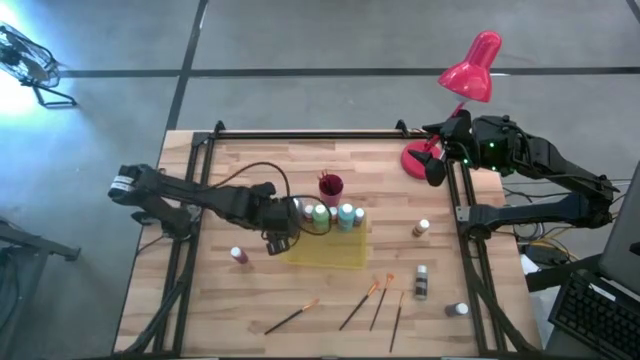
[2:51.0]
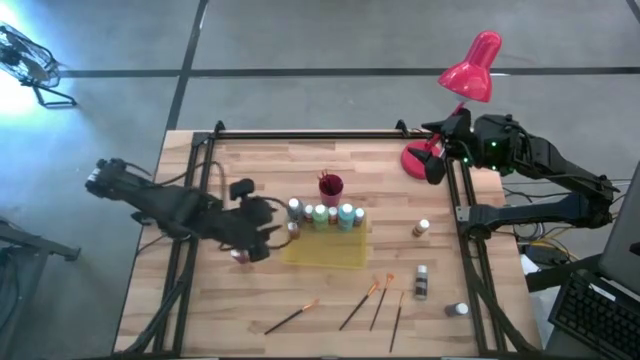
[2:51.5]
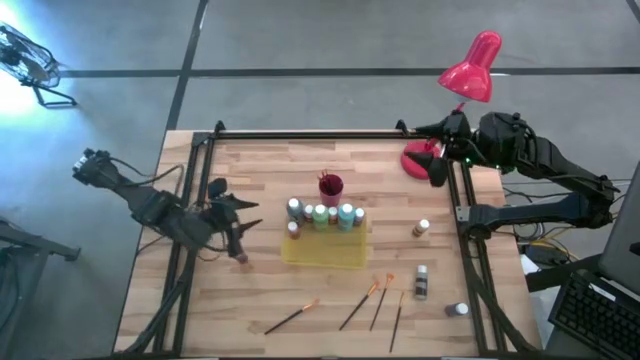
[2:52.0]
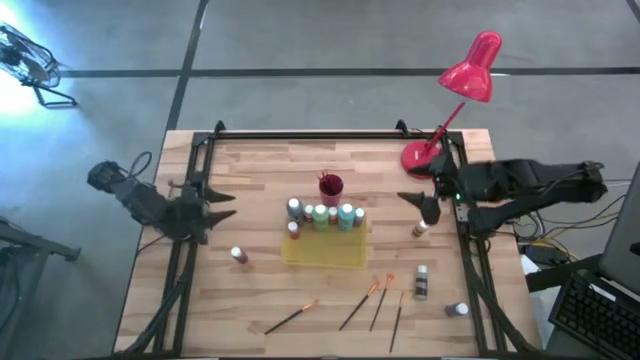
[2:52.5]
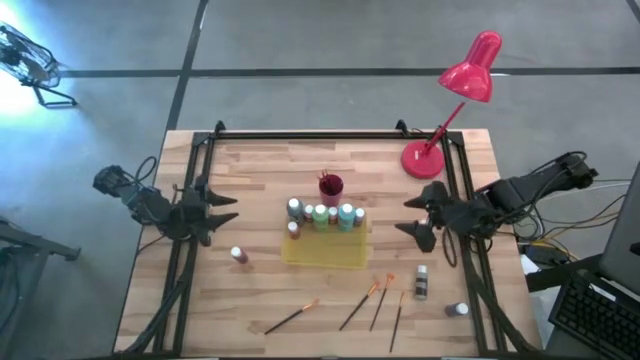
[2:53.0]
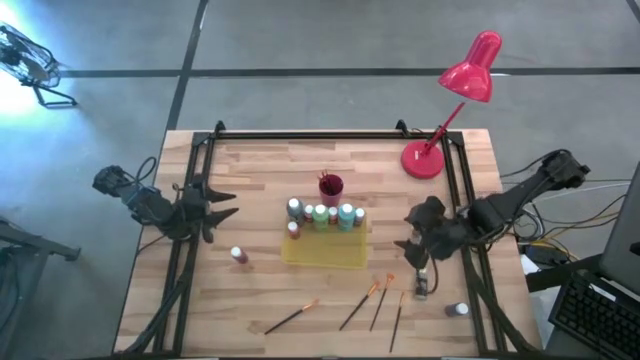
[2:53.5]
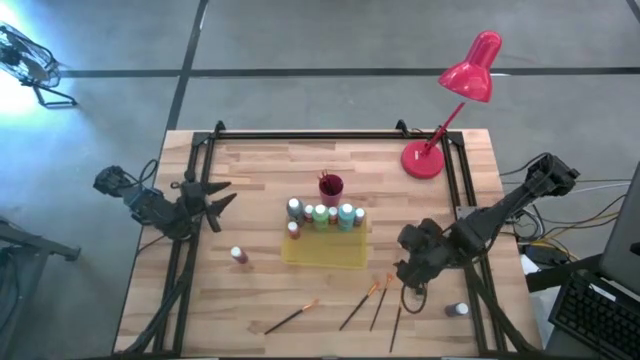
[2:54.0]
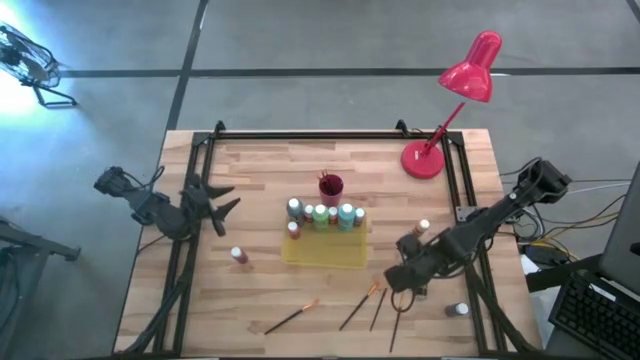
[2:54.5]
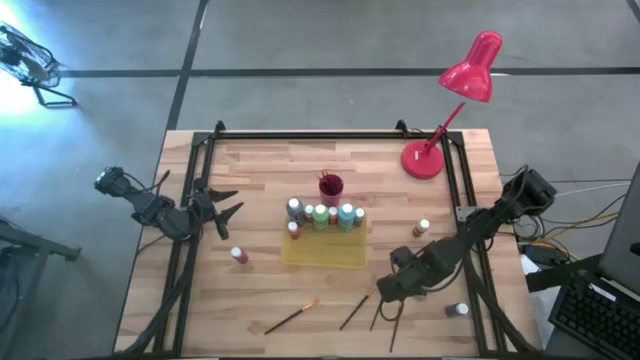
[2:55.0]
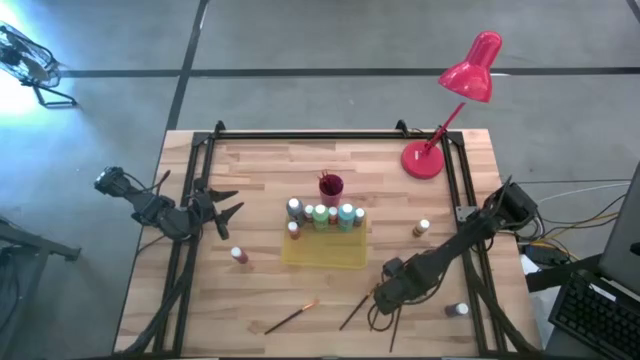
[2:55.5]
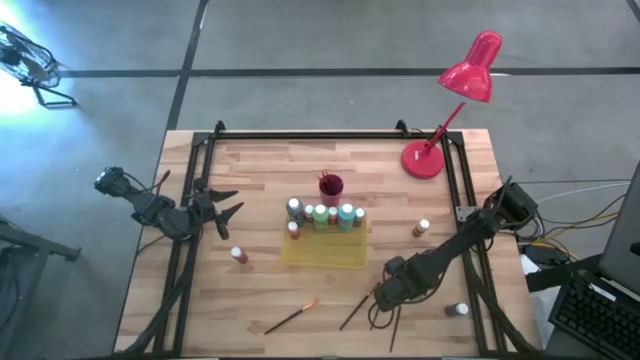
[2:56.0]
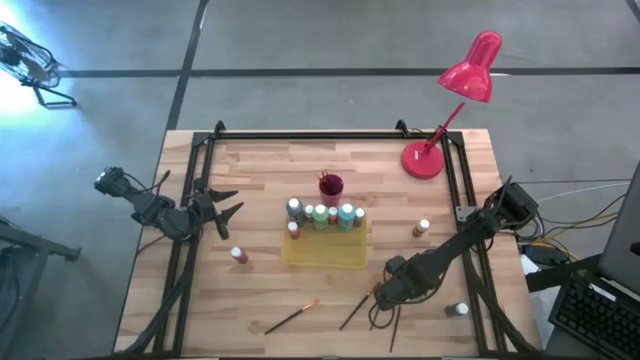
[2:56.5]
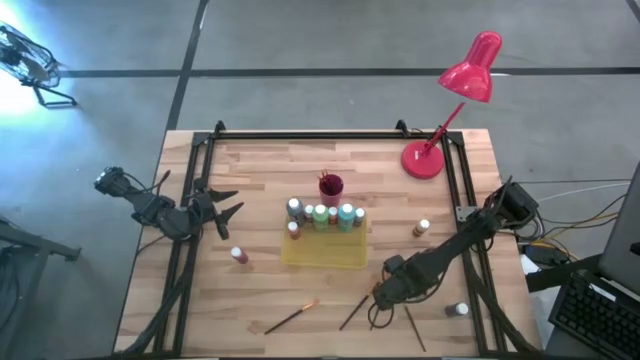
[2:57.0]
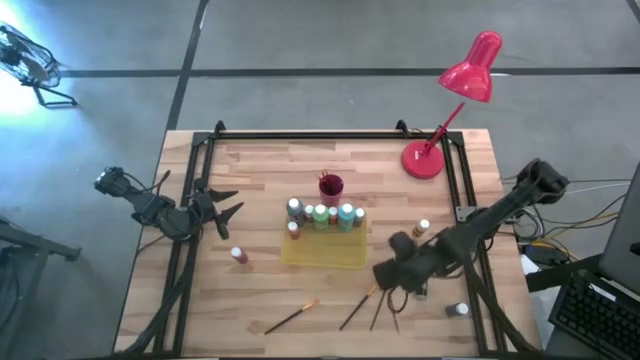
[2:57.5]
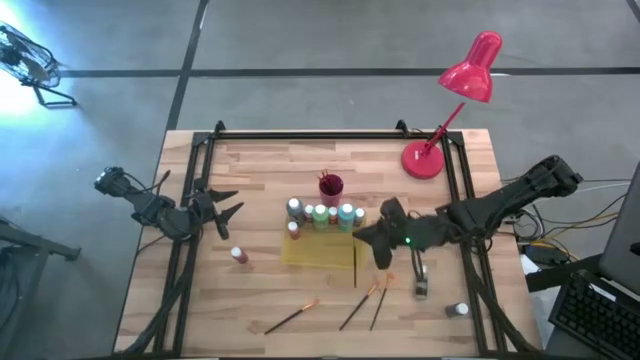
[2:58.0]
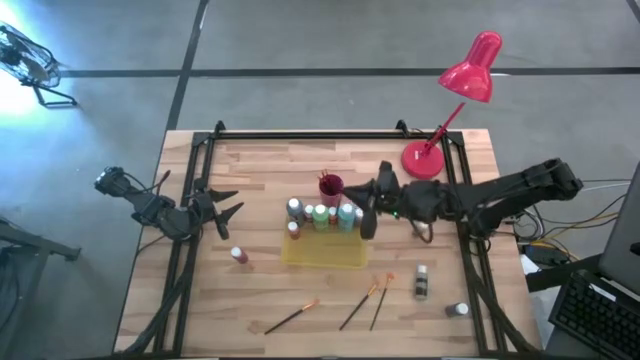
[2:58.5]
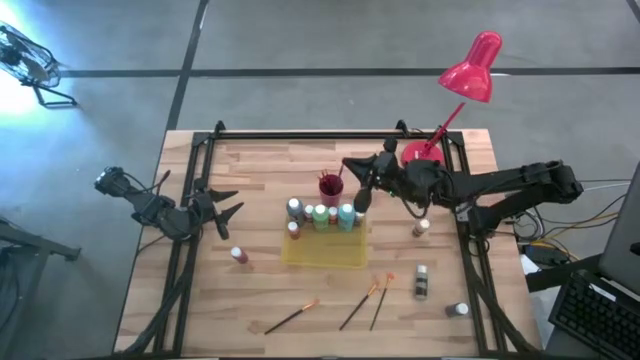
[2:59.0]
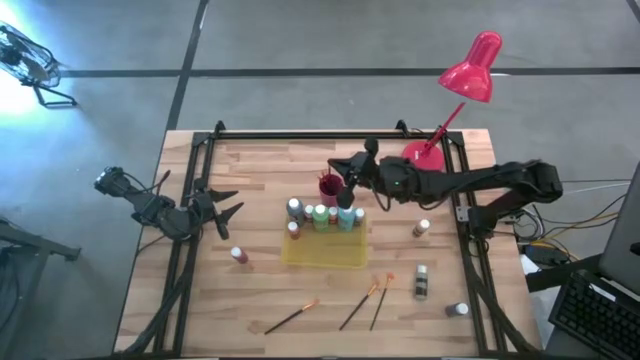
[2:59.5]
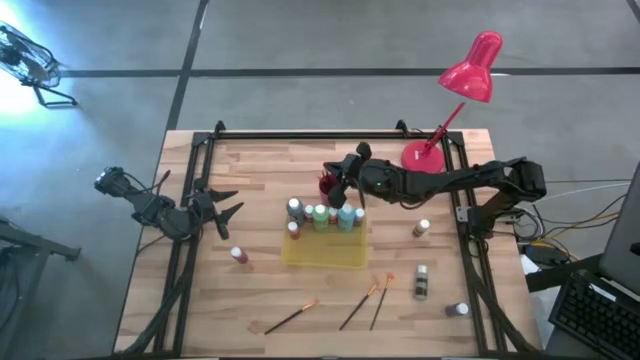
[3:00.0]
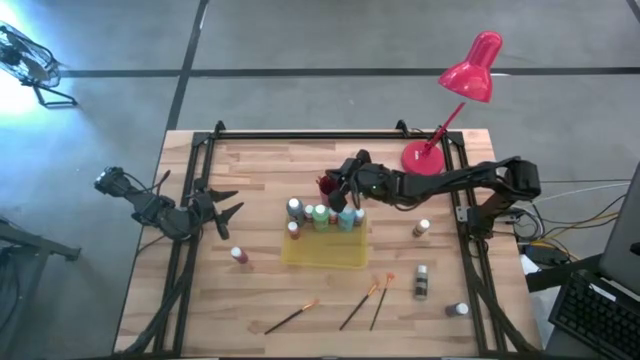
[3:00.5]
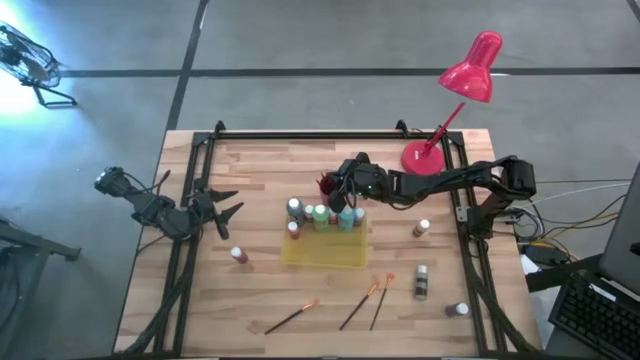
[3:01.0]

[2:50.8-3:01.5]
Task: Pick & Place Paint Supplies
Put the gold paint brush into the pink cup

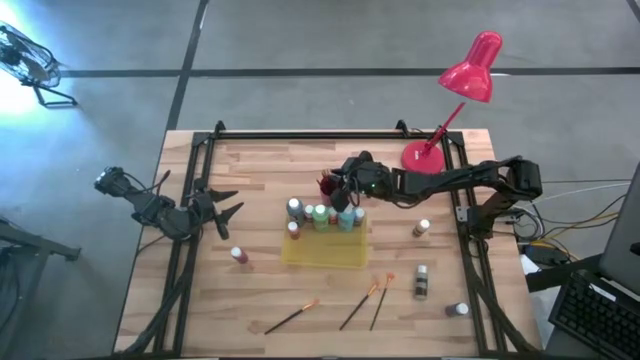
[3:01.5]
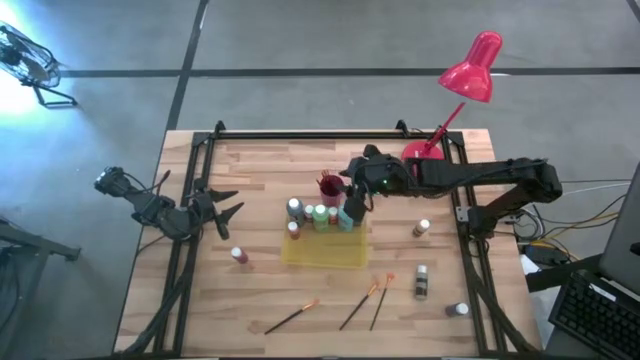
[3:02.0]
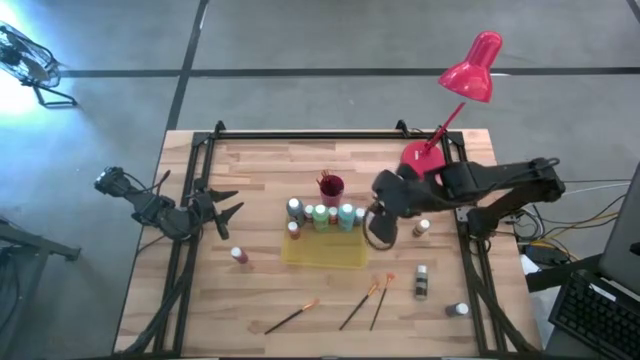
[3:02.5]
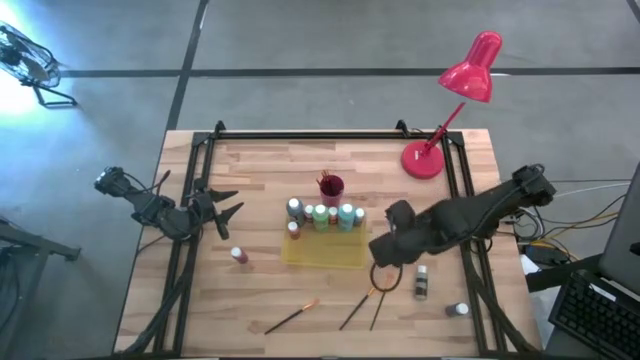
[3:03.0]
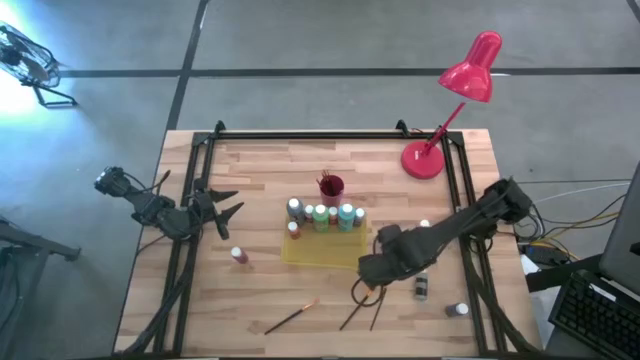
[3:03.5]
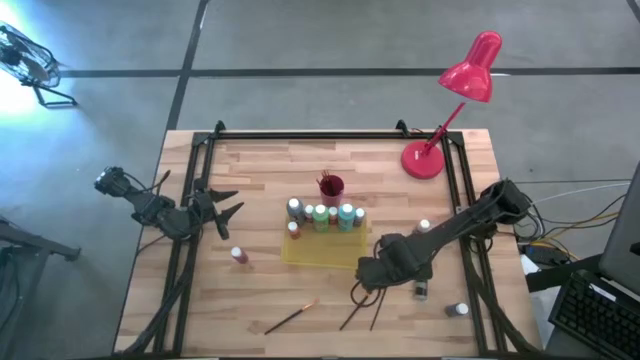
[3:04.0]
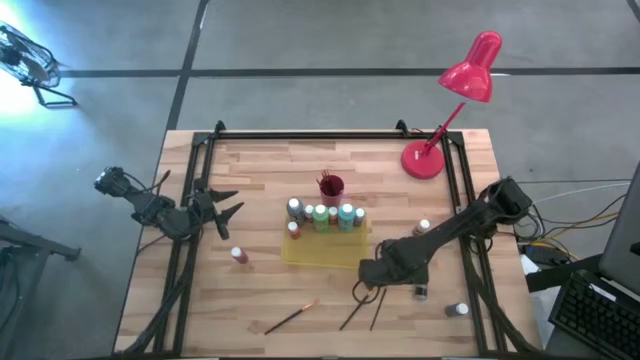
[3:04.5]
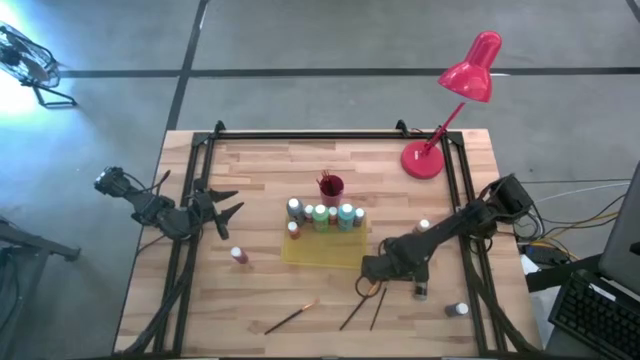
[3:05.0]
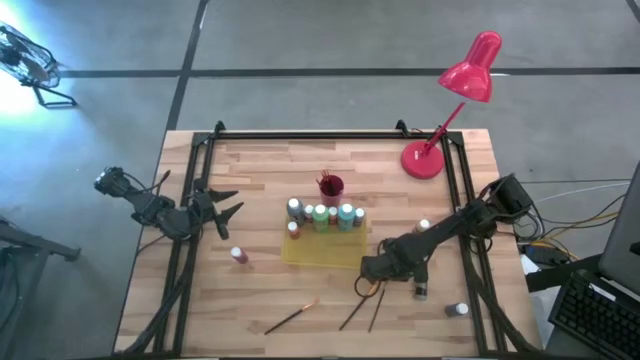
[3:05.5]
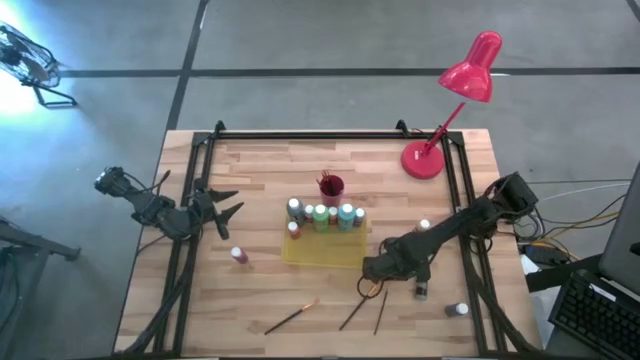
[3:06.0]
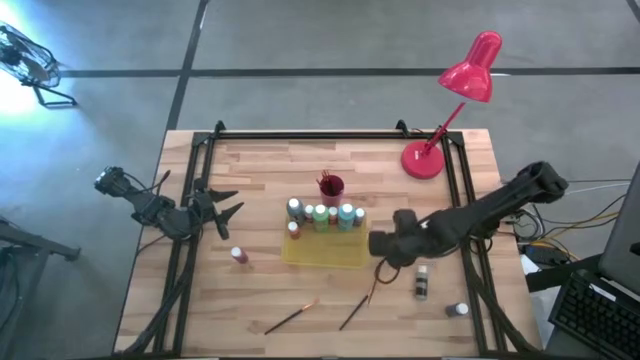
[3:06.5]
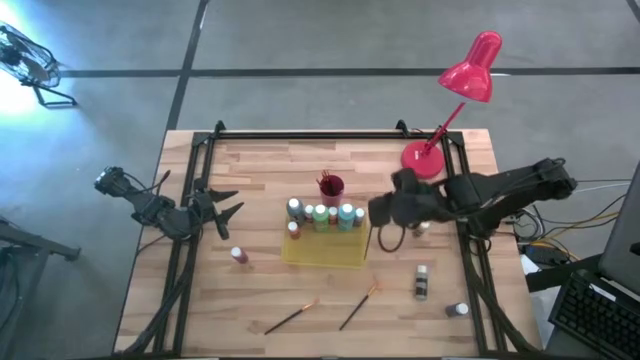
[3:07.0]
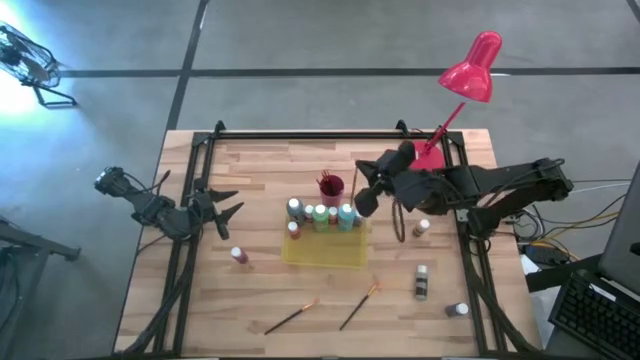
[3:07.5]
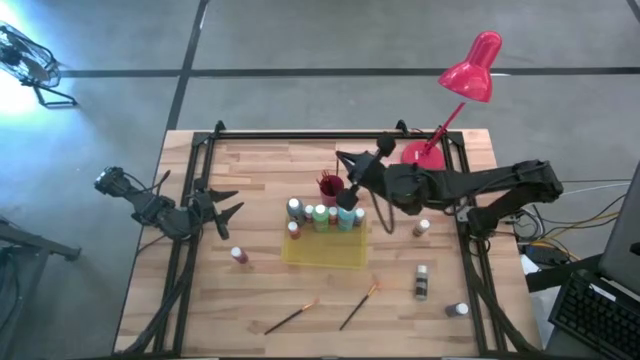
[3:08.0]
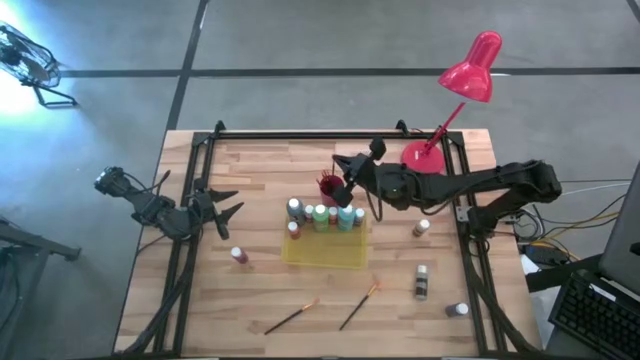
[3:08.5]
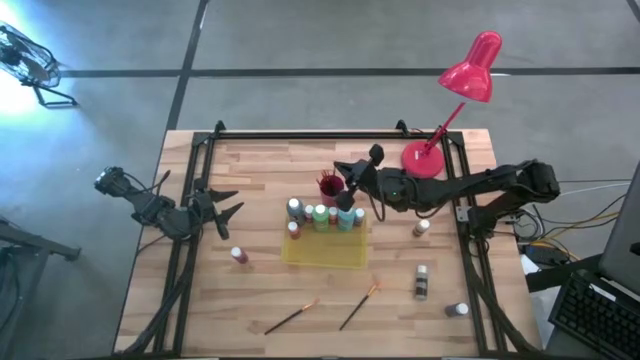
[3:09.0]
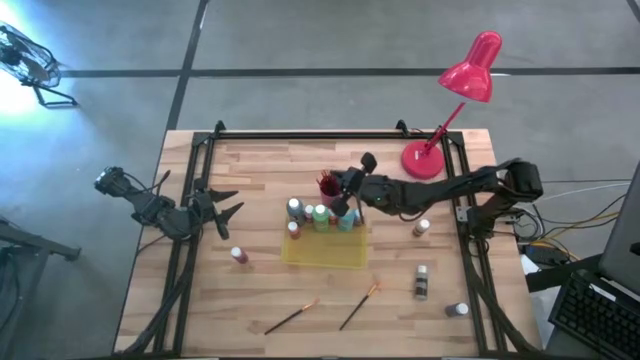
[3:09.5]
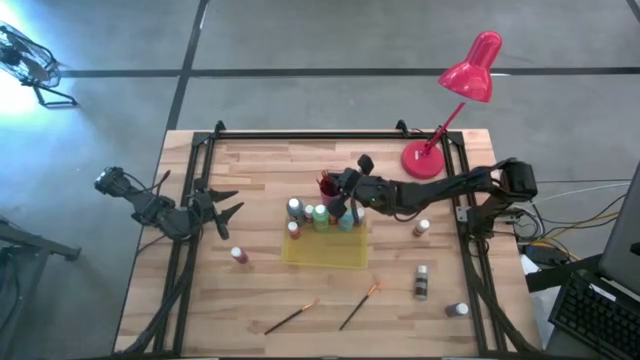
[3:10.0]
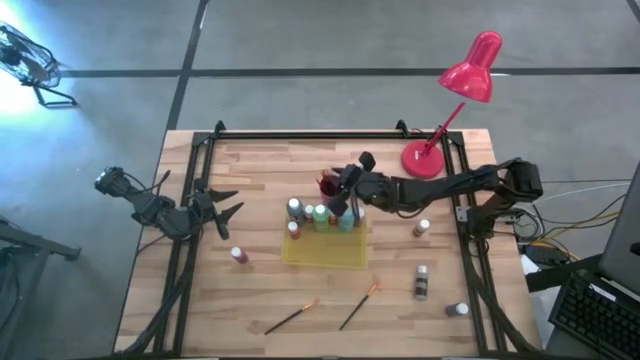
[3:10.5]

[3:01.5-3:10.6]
Put the gold paint brush into the pink cup

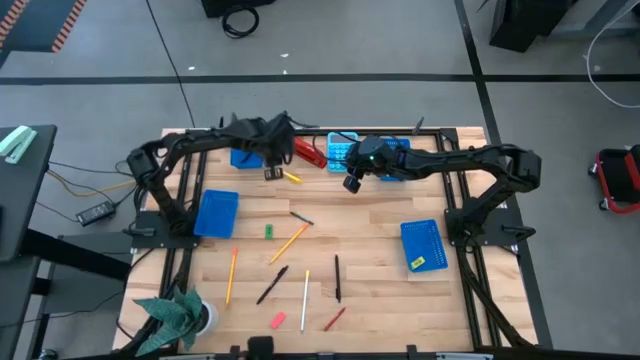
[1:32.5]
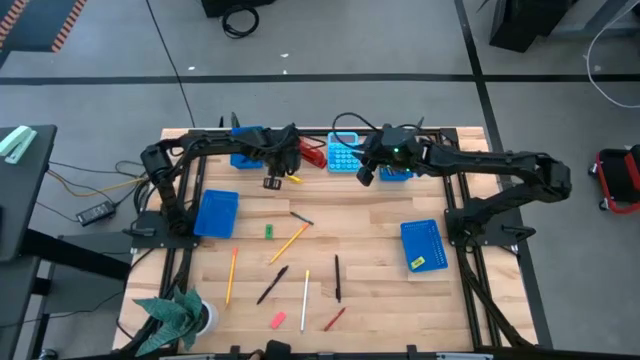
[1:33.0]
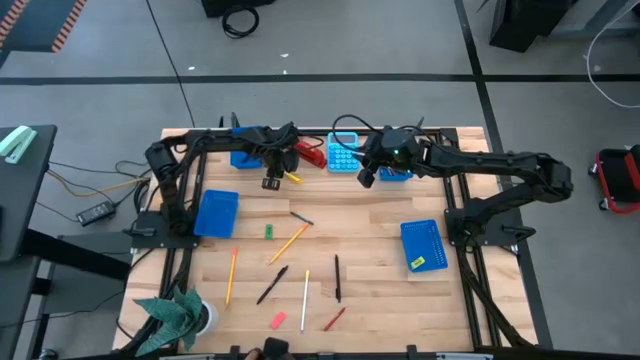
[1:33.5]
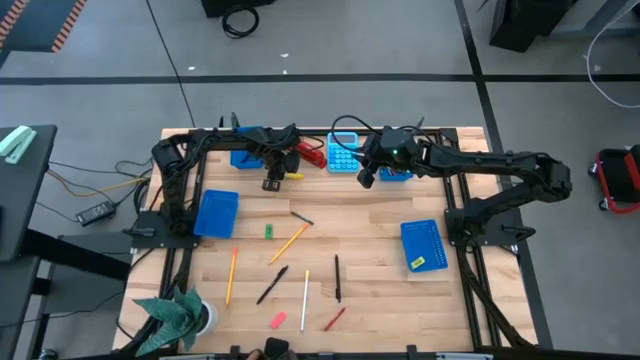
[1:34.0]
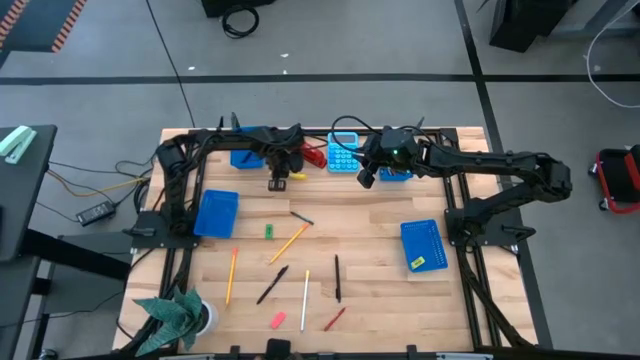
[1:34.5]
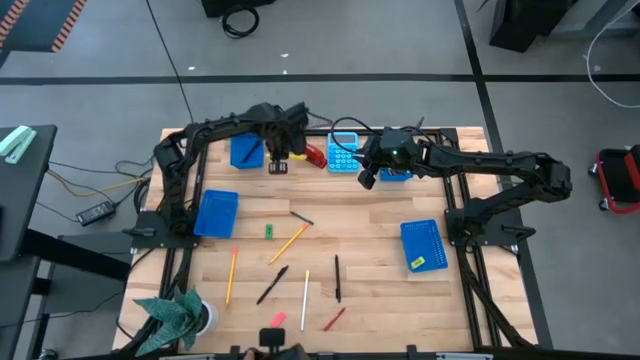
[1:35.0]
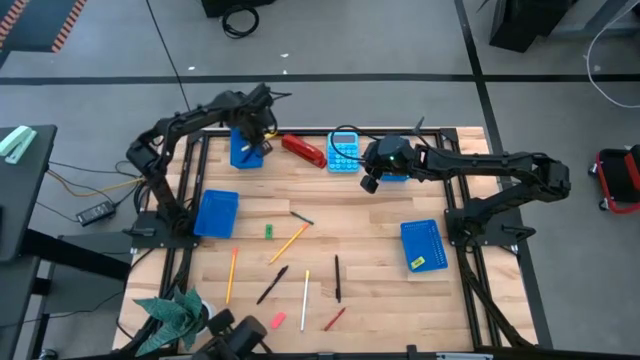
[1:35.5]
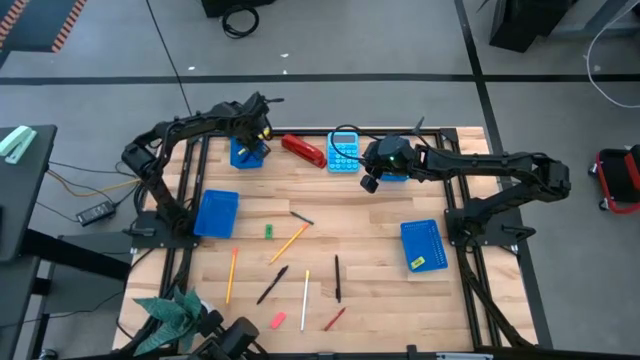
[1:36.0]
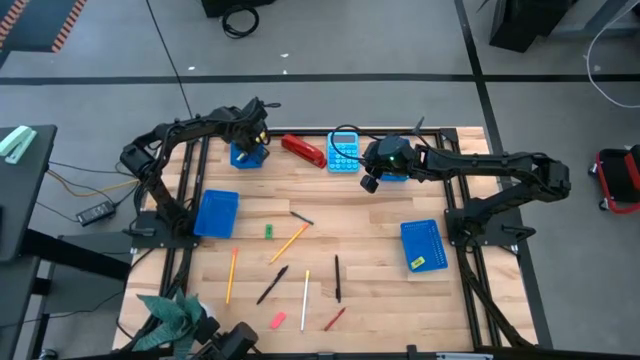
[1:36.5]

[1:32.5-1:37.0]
Task: Sort crayons/erasers/pens/pencils in bins
Put the yellow pen into the top left bin
